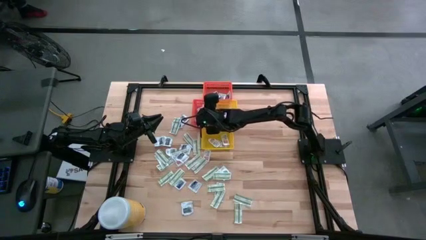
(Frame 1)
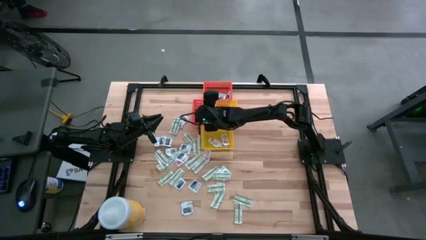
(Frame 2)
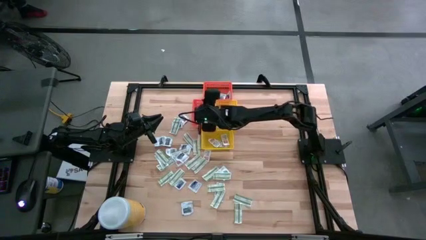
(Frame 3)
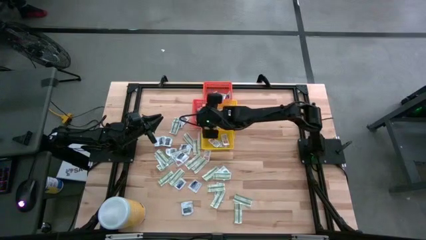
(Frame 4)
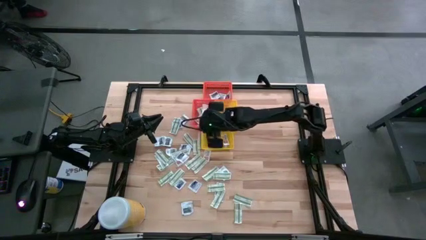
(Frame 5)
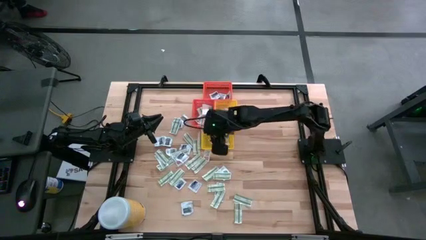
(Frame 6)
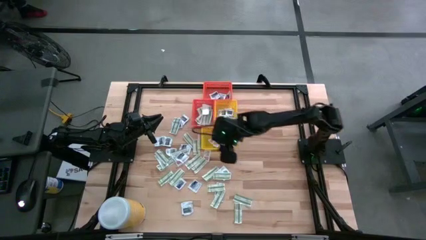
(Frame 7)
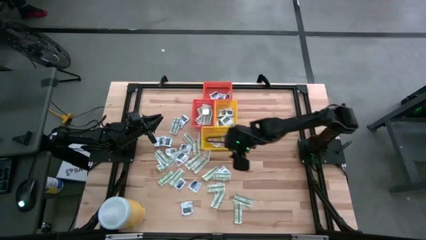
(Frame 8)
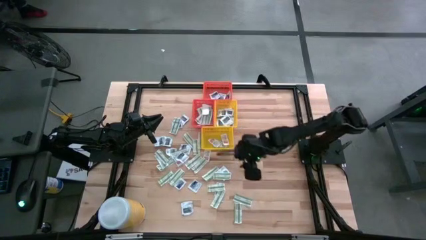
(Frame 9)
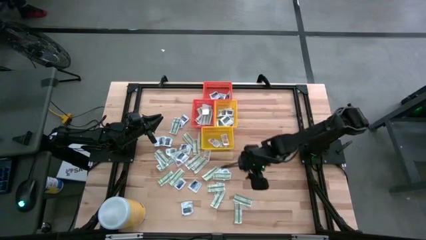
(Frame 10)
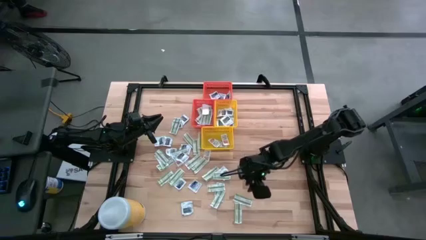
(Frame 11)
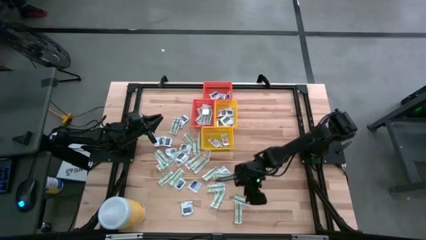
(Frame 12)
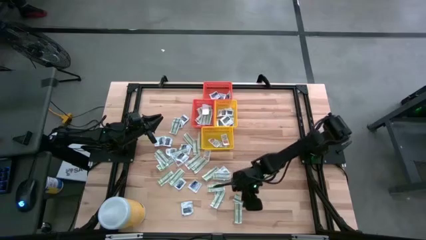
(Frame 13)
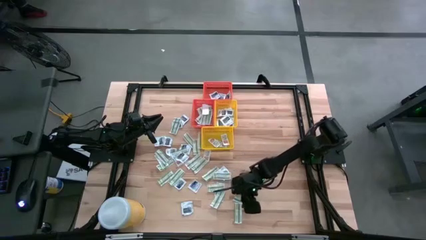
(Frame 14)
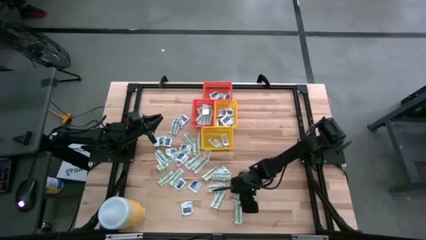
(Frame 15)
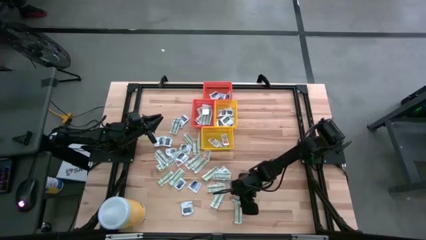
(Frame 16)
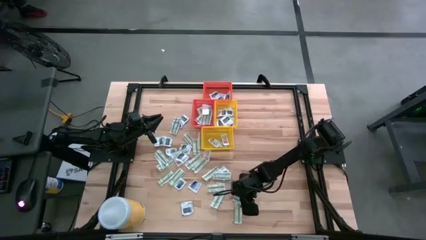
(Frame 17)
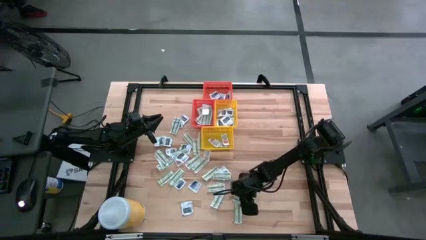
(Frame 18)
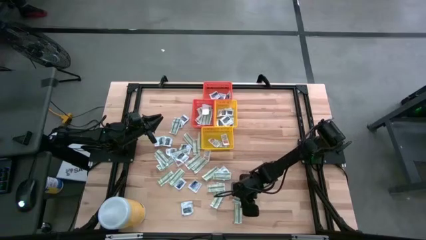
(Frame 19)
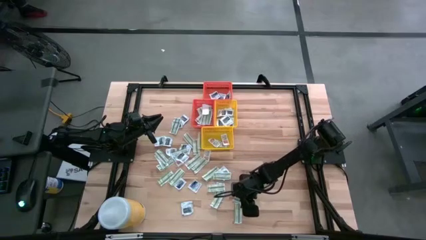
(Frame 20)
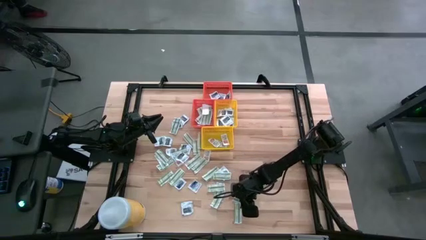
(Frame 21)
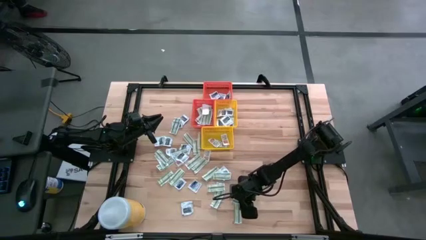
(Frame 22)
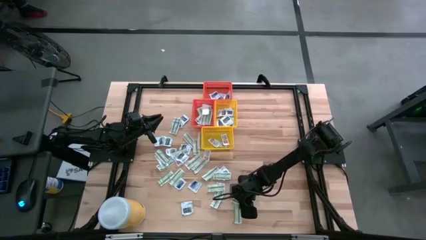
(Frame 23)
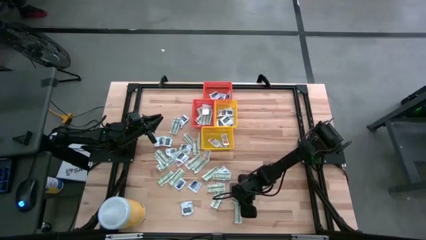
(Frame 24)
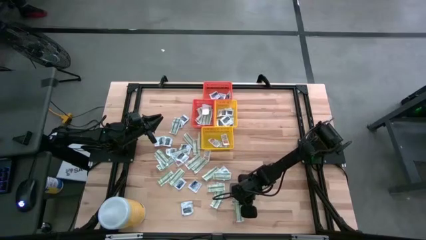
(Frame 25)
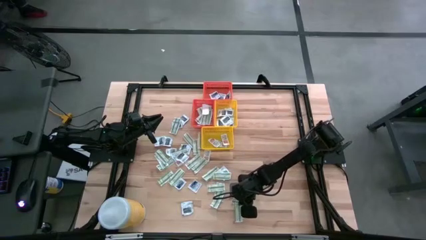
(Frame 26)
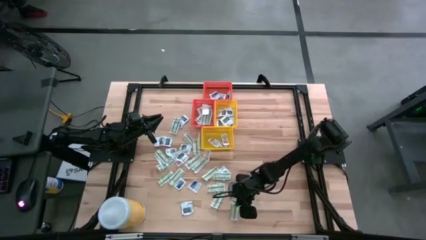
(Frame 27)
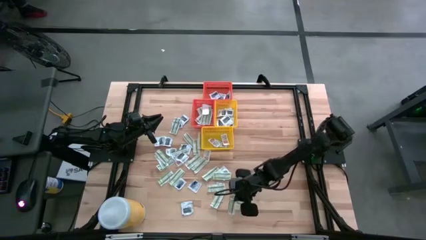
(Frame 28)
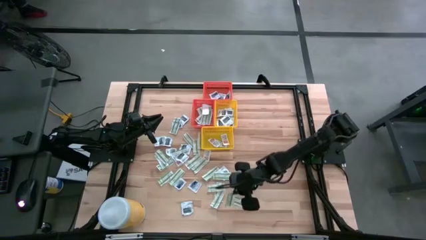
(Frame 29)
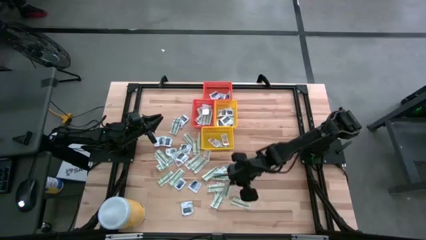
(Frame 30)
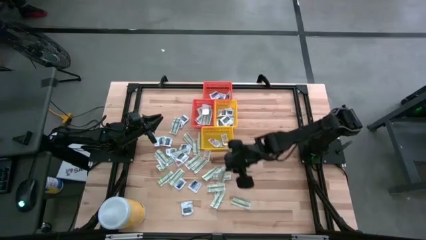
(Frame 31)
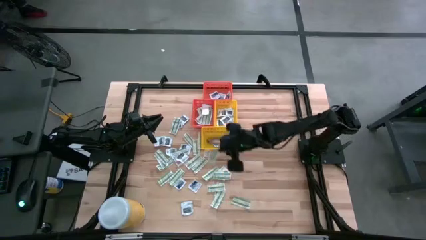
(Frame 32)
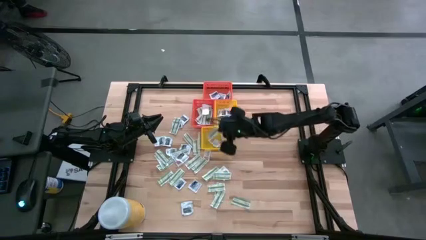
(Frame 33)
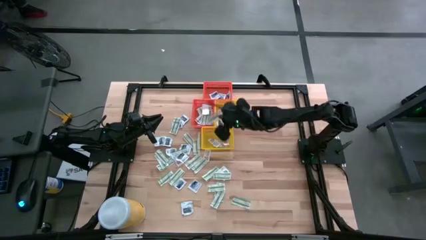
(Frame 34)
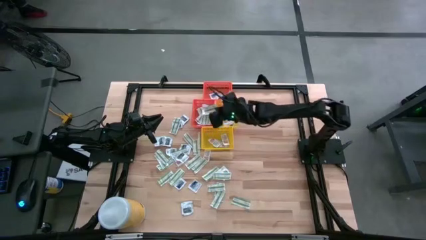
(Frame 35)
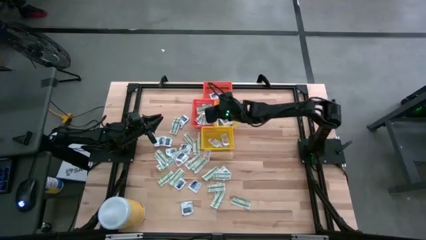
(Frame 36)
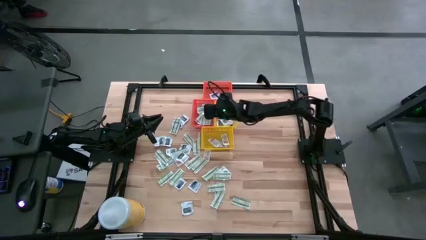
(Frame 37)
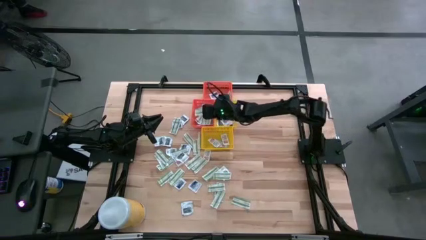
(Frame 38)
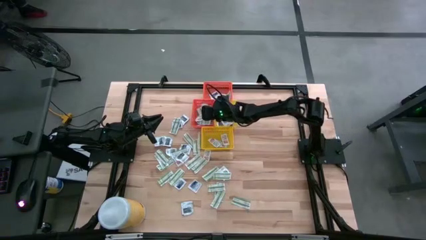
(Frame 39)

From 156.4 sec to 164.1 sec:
Task: Pick & Place First Aid Supplies
Put the bandage into the bottom orange bin

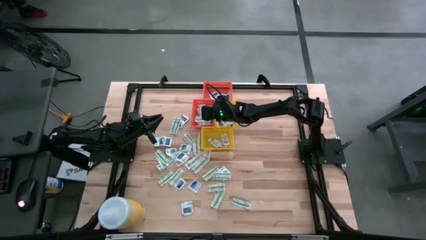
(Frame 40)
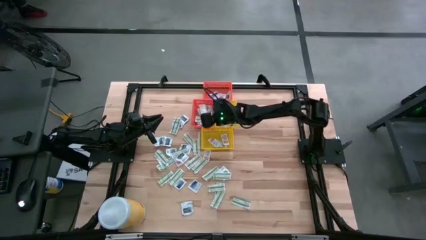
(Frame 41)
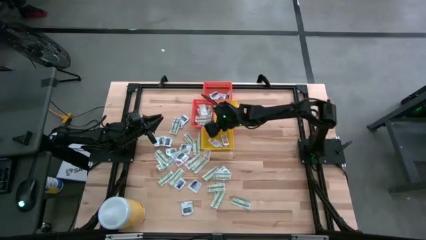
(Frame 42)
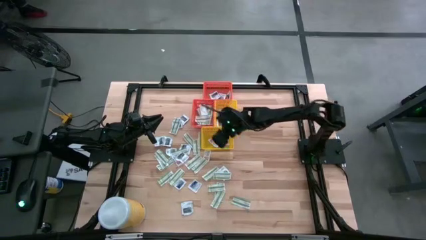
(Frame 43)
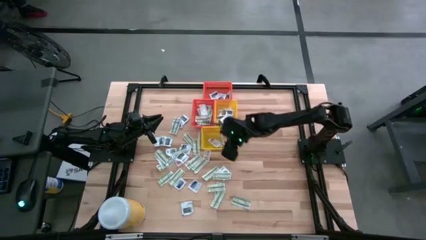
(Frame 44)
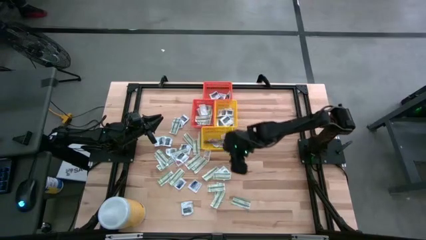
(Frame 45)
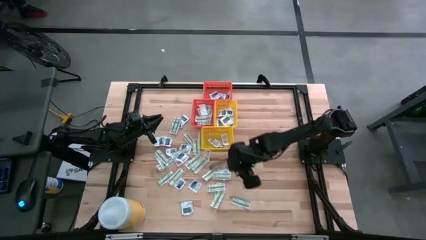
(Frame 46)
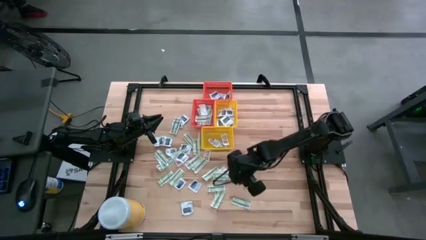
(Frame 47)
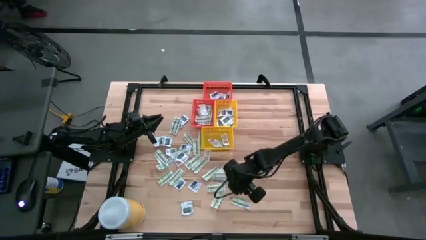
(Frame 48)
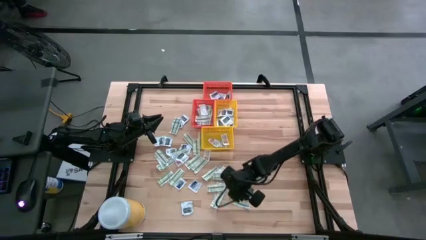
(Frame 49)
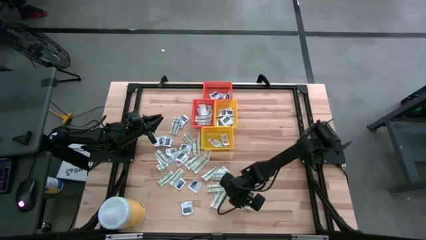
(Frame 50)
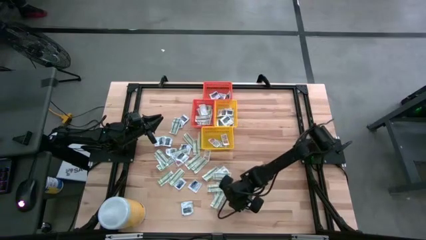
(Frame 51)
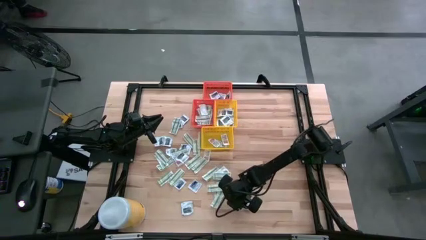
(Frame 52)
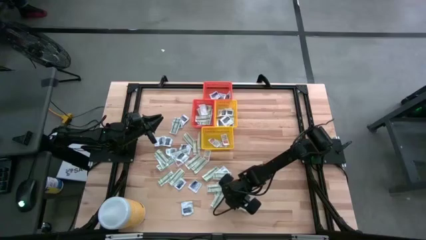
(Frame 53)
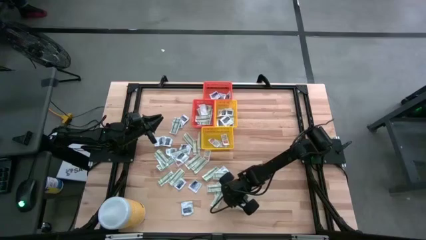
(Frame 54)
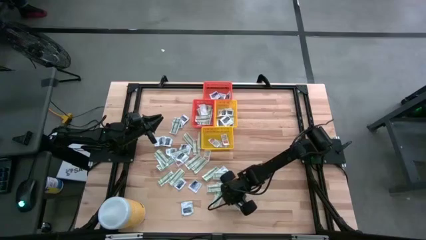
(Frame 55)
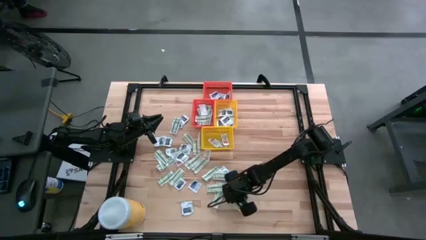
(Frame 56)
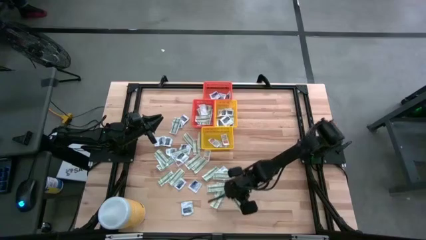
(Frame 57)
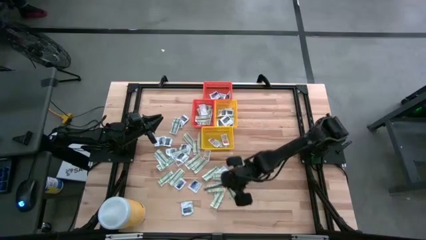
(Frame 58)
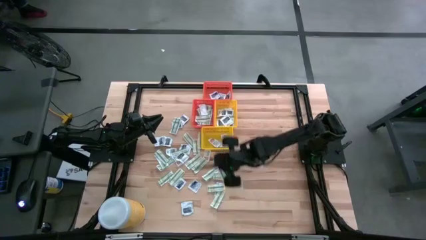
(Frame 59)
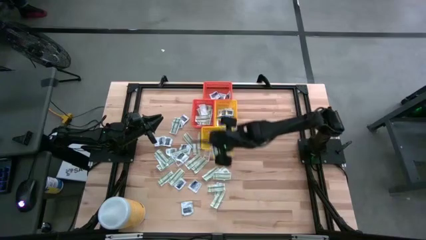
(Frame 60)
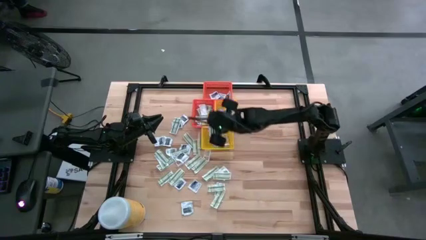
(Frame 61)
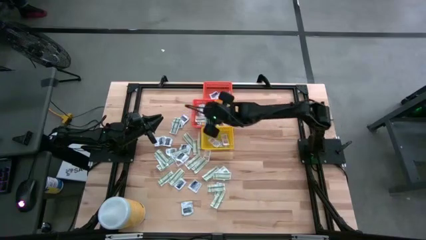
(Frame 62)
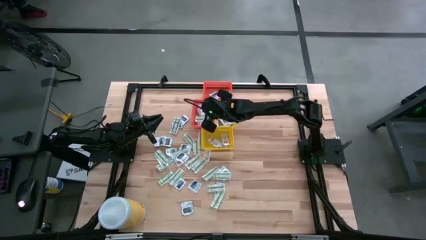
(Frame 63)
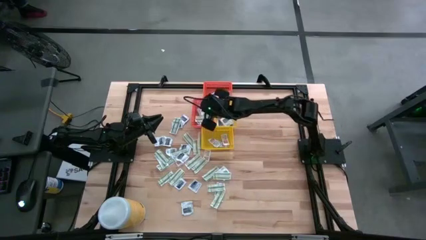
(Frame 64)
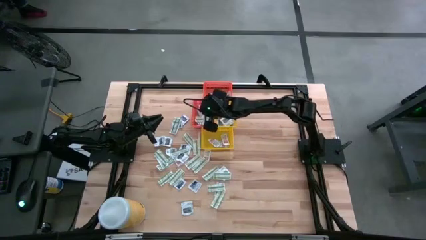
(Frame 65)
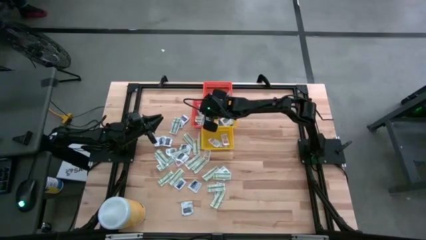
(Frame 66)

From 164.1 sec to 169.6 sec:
Put the bandage into the bottom orange bin

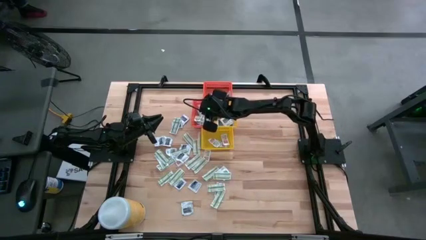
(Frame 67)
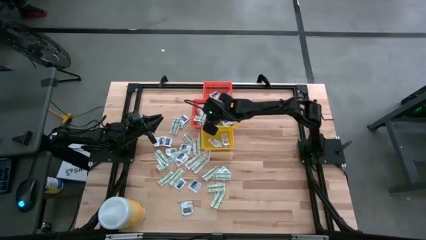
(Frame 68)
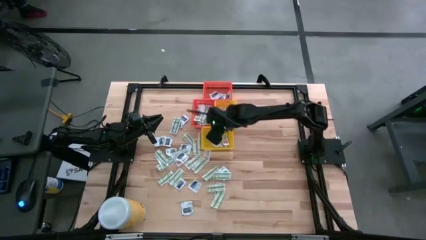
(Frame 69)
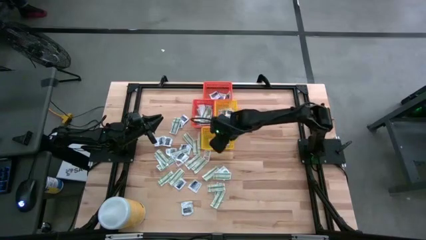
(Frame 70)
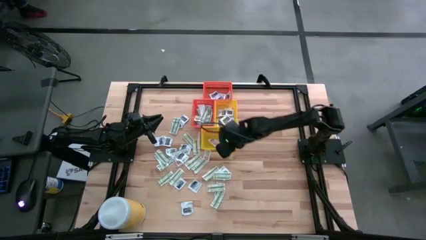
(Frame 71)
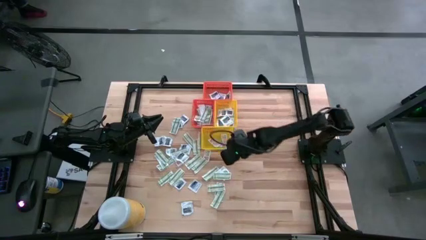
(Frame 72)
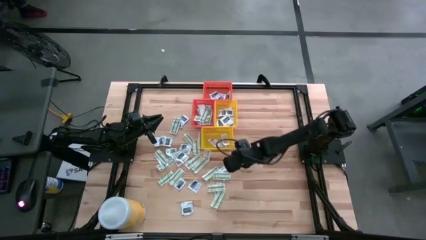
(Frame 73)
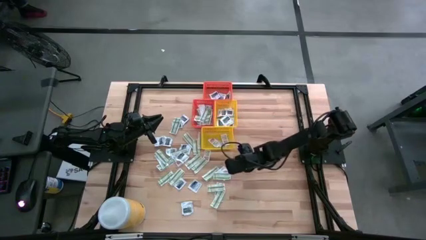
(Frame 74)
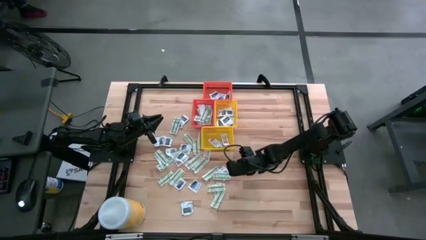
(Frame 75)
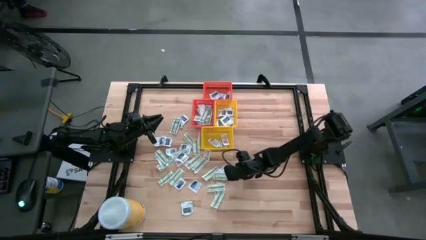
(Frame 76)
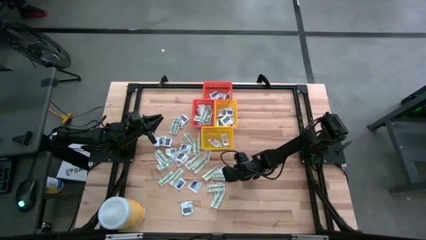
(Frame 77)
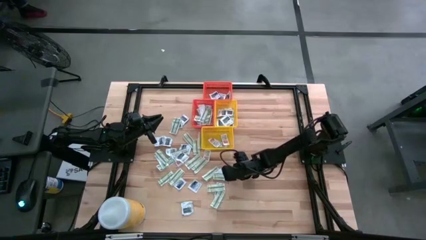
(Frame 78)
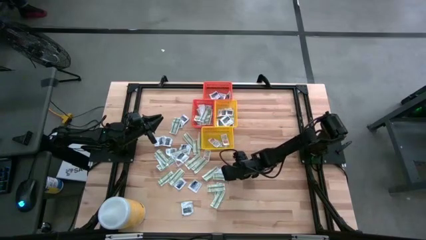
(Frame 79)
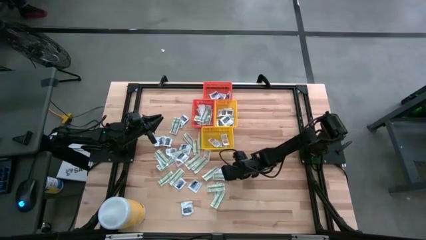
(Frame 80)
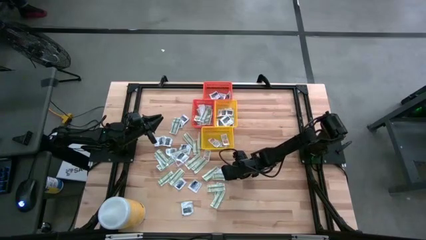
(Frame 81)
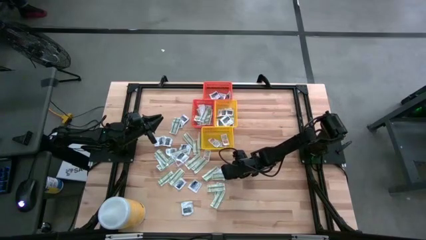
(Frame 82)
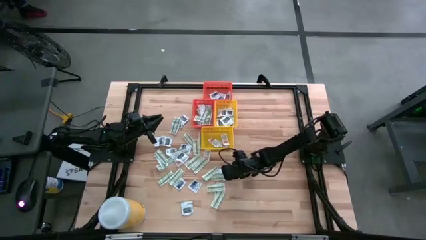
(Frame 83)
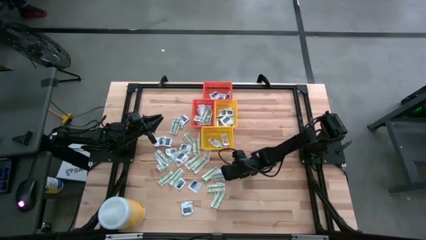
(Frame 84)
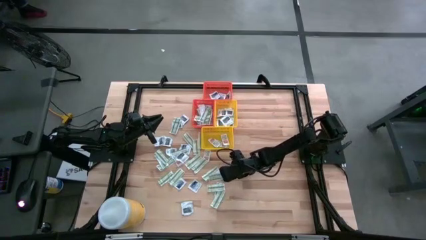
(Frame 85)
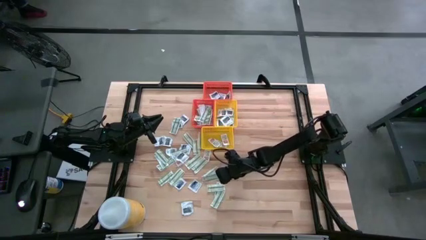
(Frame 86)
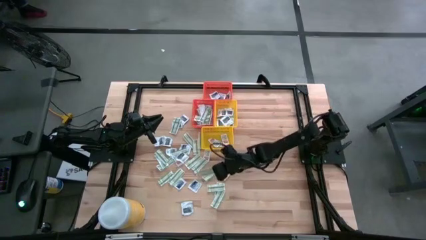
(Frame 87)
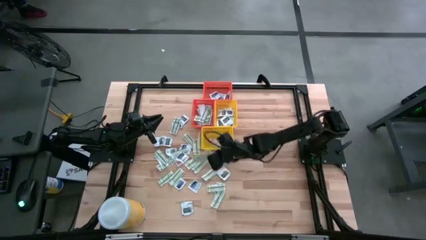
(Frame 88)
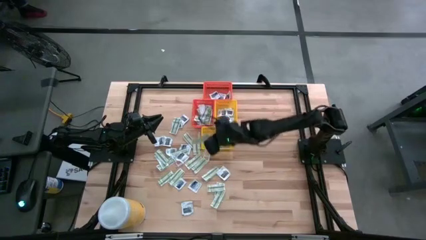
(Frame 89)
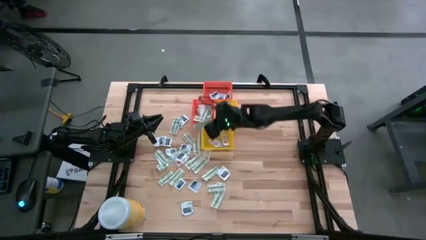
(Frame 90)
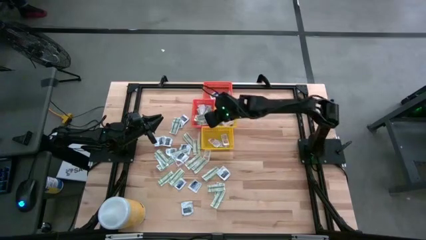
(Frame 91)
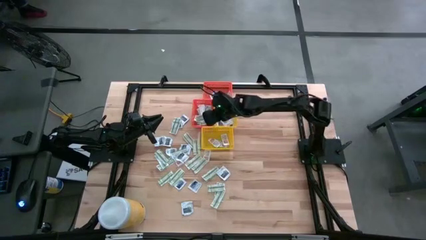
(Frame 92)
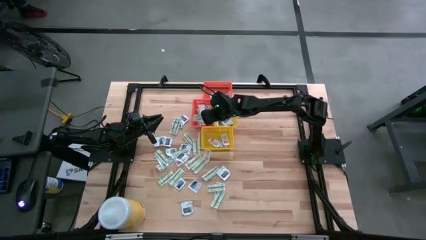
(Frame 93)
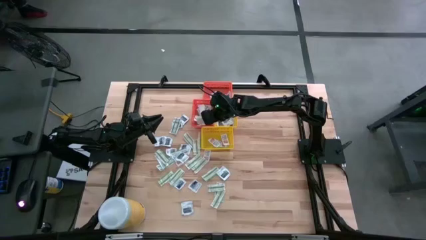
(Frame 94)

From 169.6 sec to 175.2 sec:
Put the bandage into the bottom orange bin
